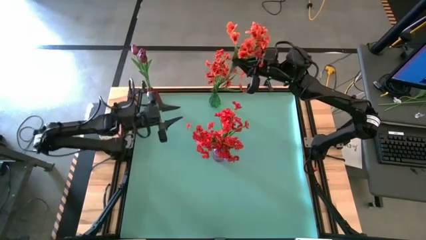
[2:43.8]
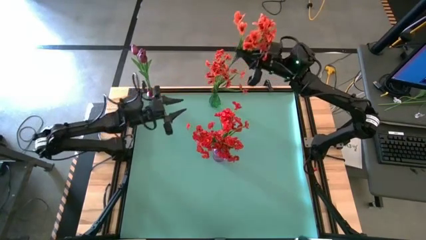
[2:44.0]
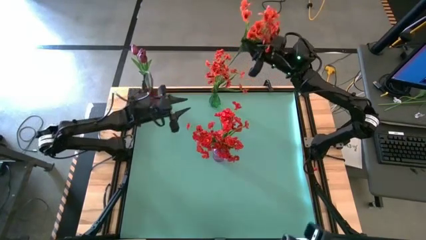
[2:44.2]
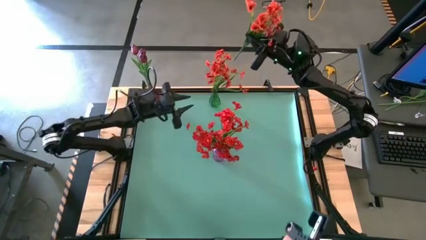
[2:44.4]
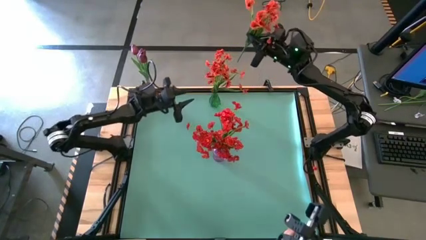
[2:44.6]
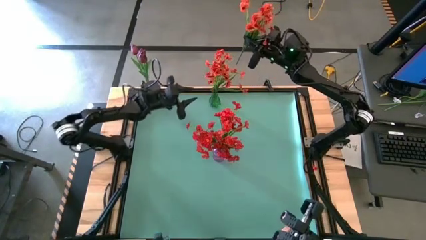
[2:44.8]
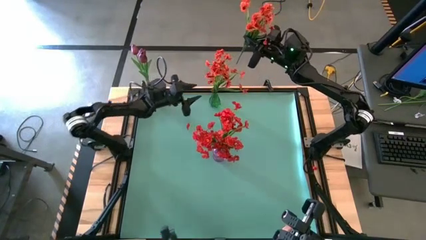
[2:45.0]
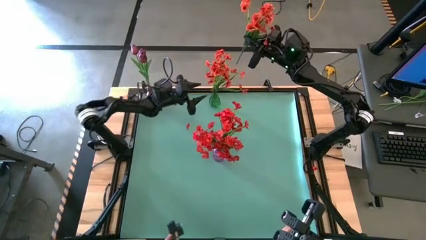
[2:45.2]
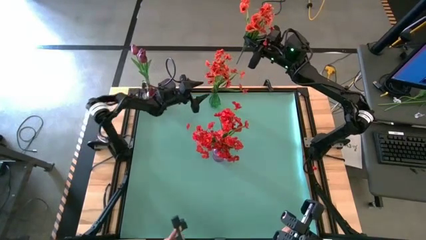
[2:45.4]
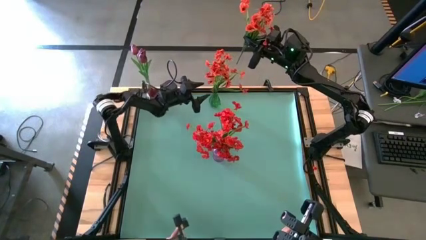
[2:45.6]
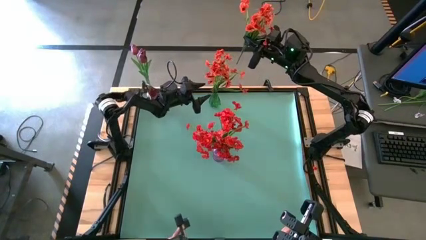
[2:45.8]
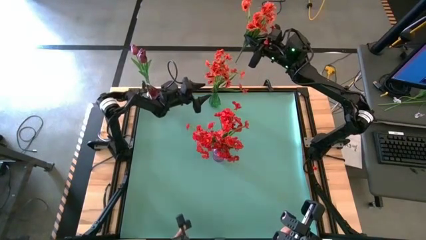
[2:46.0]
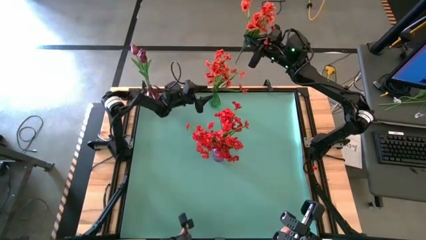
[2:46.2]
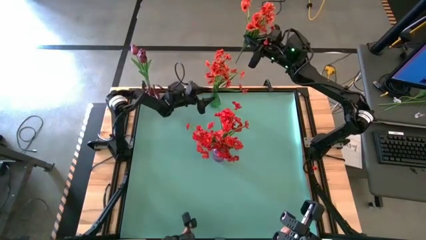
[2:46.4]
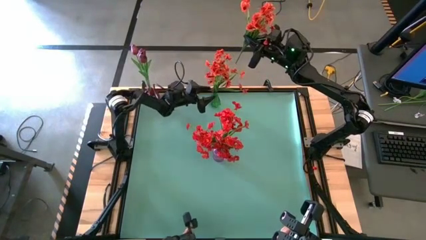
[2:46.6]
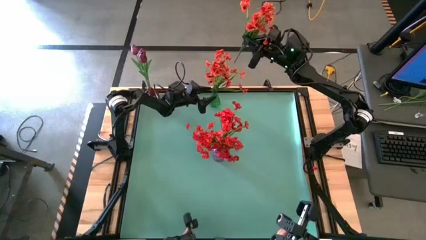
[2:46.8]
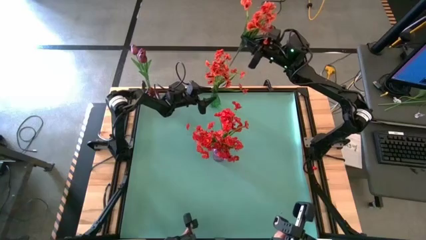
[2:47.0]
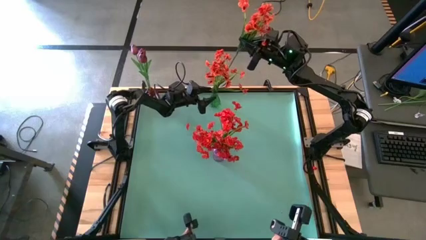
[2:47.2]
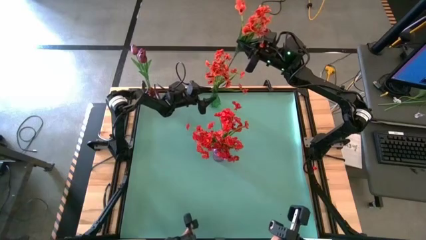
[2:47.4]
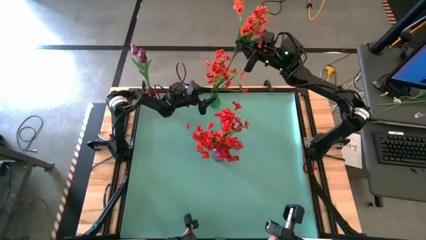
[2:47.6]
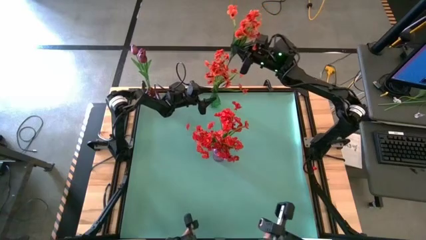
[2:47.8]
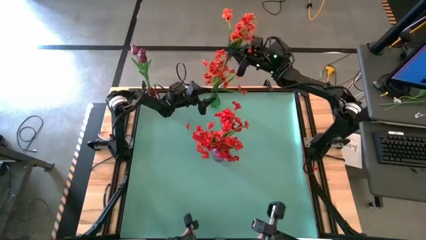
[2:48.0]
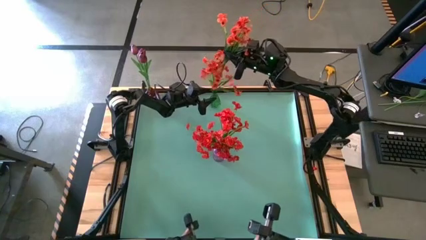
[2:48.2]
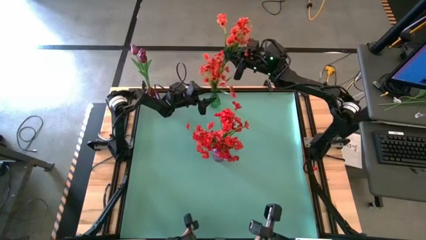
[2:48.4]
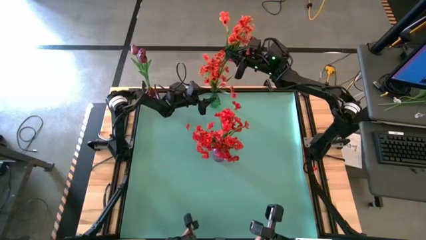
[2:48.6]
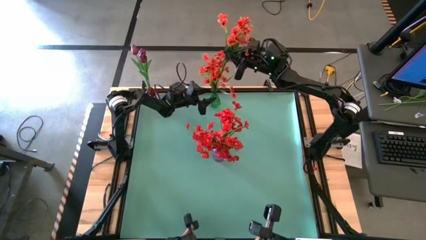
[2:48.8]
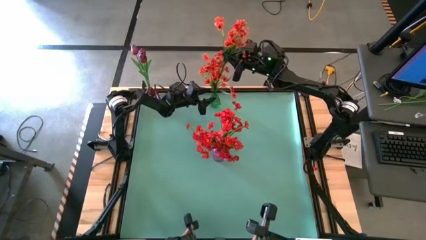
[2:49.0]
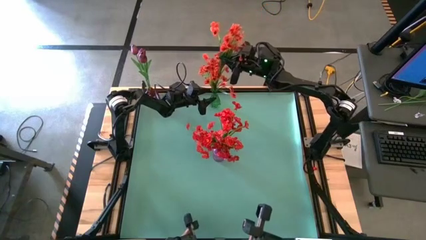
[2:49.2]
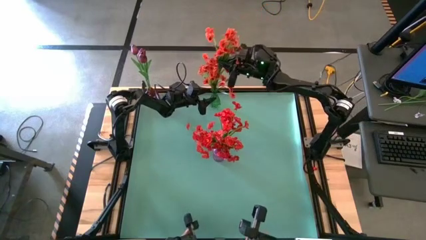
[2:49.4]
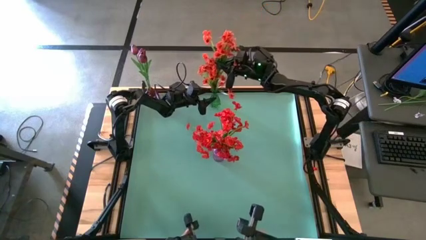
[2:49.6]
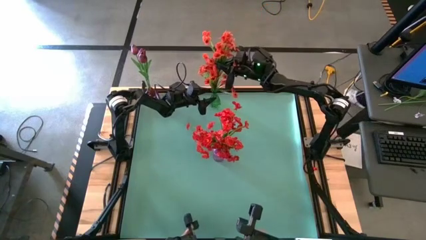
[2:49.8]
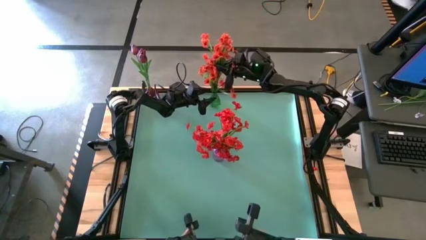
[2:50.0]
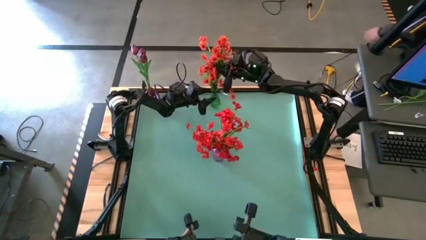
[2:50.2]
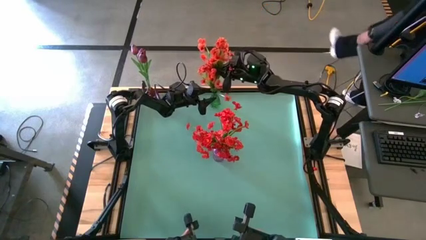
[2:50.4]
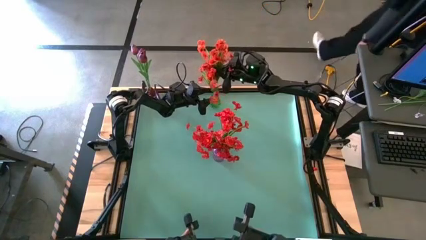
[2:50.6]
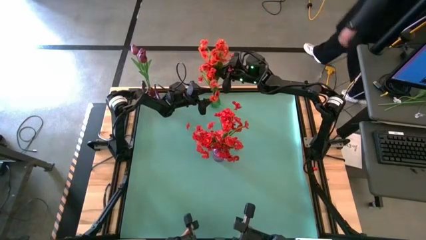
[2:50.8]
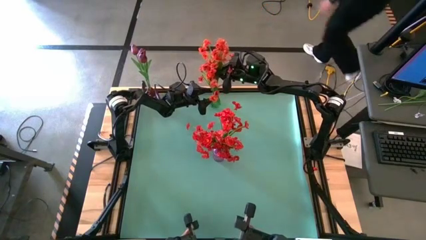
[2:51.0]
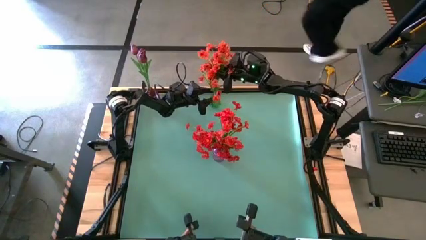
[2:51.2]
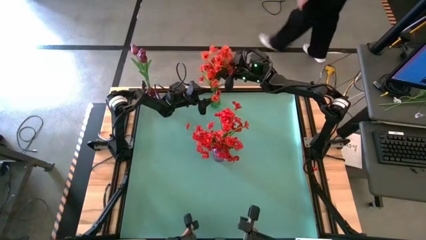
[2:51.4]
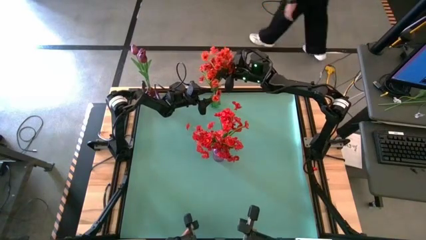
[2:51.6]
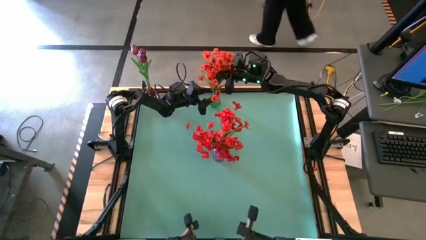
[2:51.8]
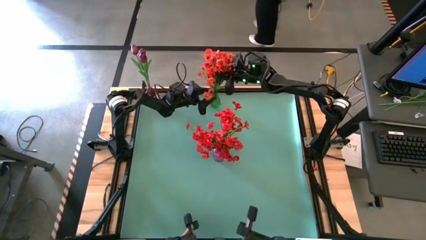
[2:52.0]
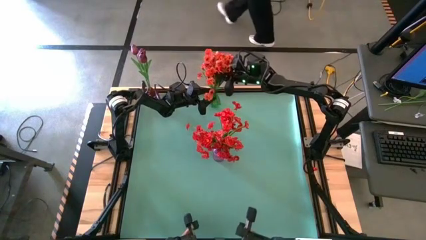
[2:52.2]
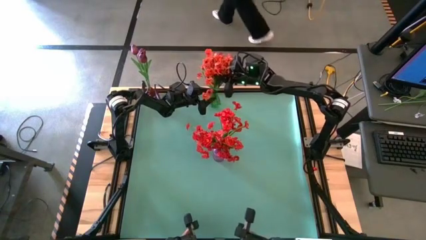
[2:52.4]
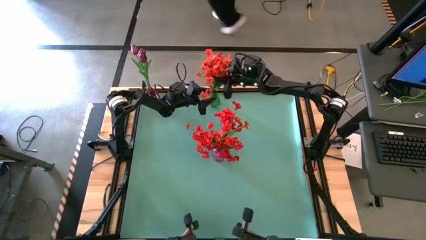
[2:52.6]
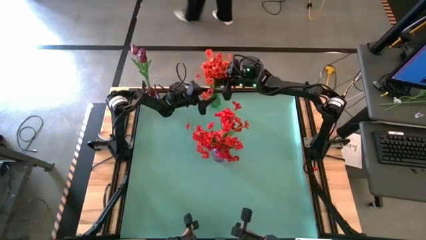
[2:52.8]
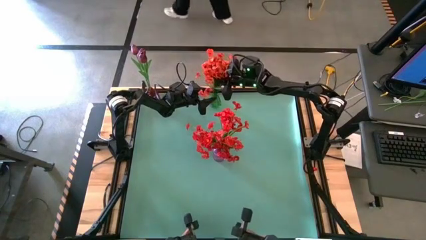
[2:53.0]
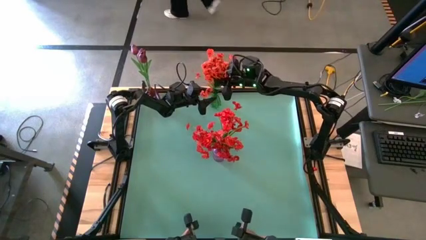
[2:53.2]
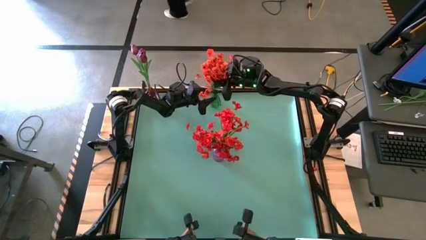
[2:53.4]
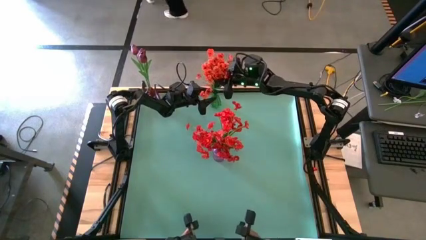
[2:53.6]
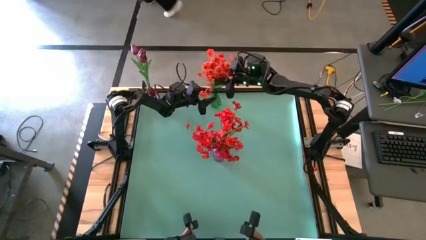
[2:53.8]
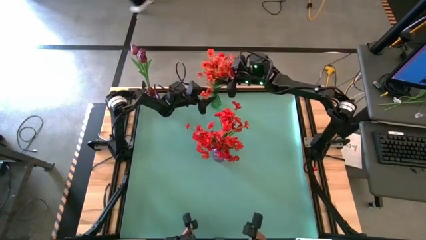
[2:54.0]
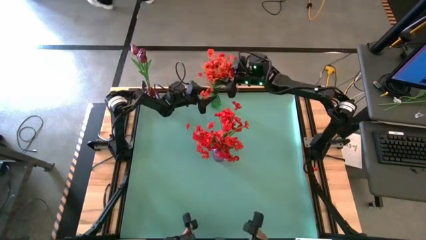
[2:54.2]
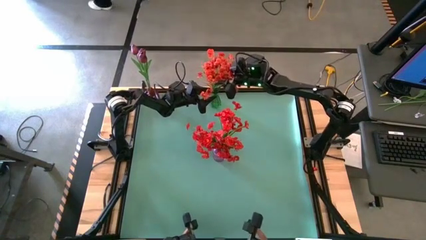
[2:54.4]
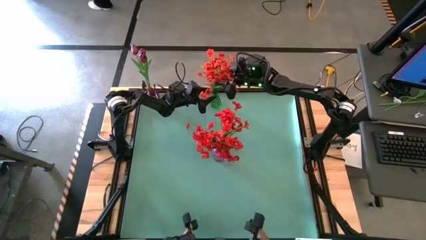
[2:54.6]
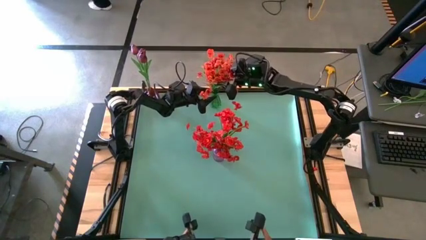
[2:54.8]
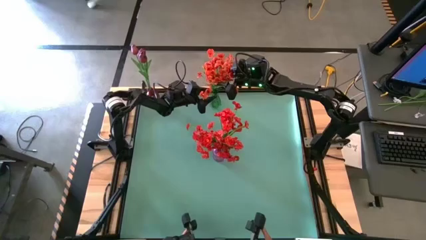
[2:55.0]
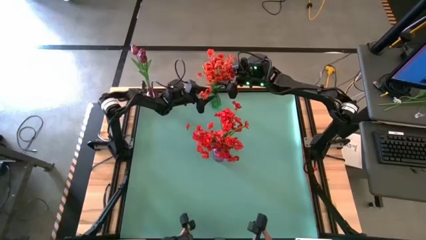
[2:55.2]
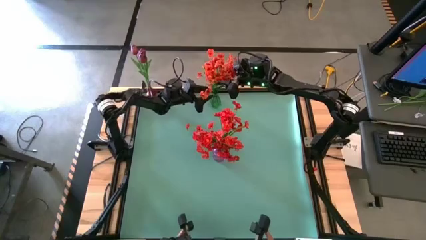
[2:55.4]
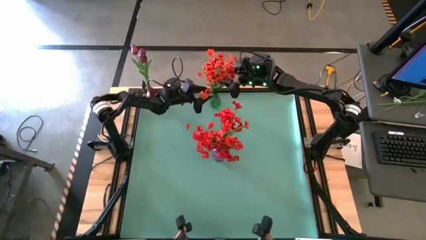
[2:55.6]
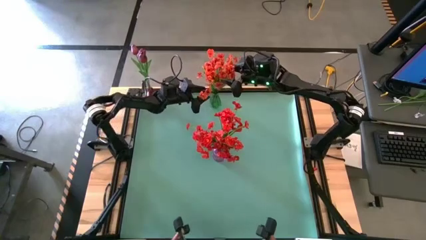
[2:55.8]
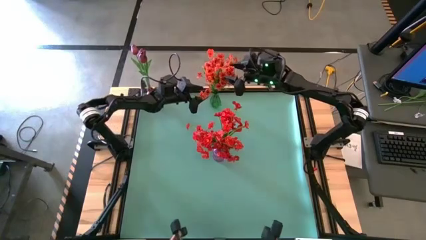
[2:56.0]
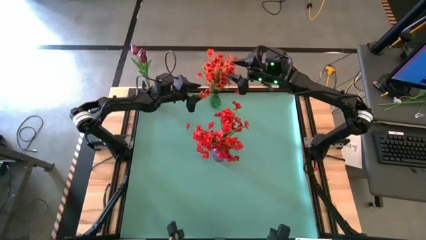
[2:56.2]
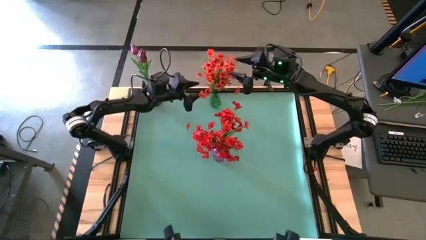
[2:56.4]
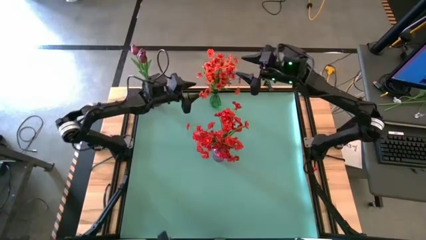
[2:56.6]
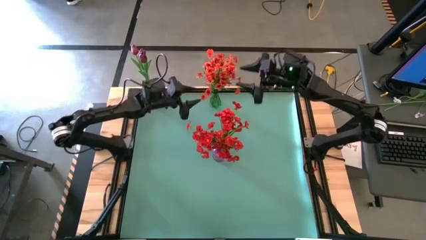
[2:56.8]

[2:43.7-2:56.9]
Task: Sort flowers into vase by color
Put the orange flowers into the green vase
